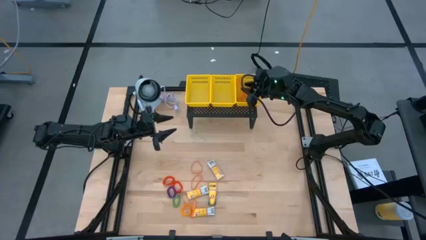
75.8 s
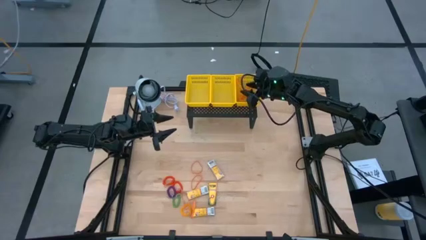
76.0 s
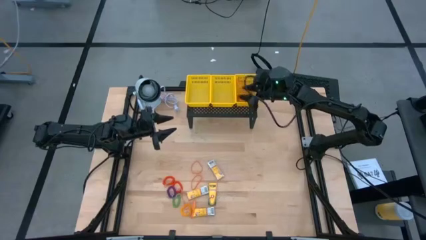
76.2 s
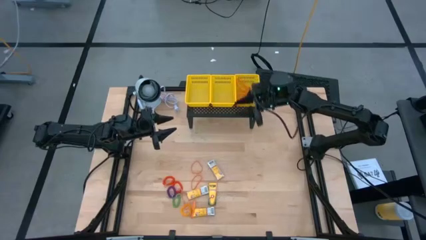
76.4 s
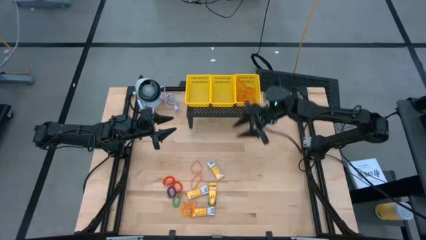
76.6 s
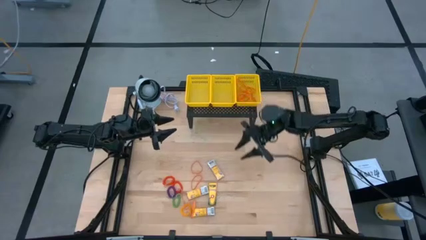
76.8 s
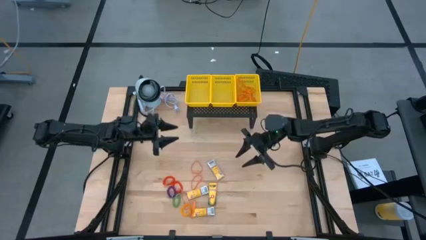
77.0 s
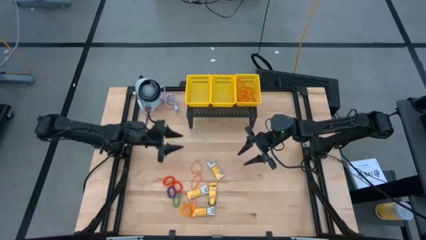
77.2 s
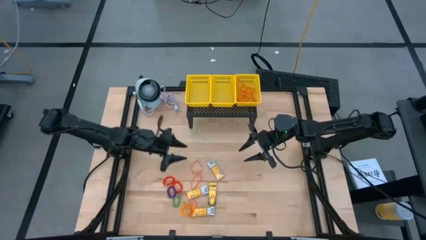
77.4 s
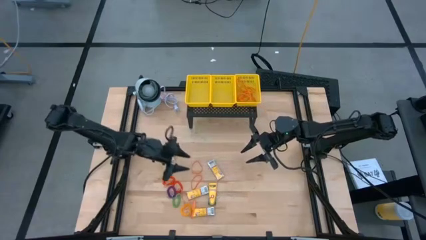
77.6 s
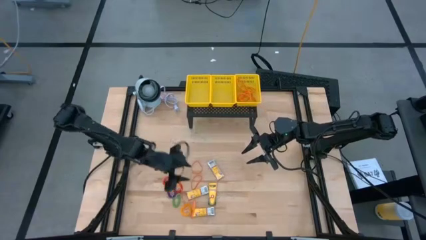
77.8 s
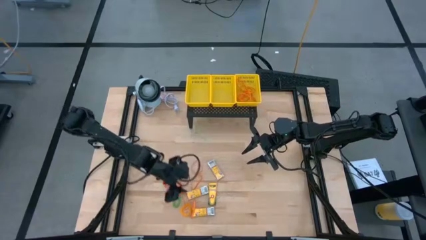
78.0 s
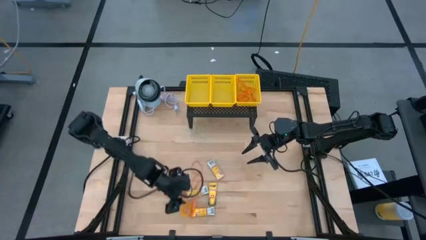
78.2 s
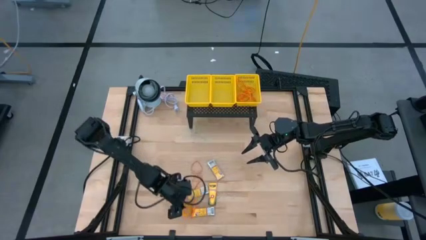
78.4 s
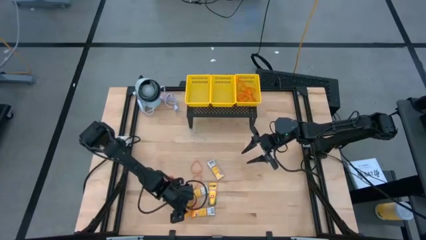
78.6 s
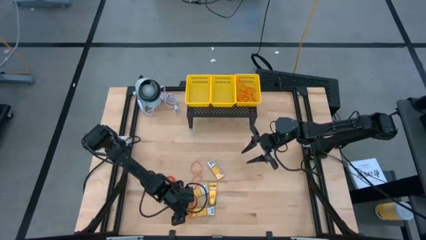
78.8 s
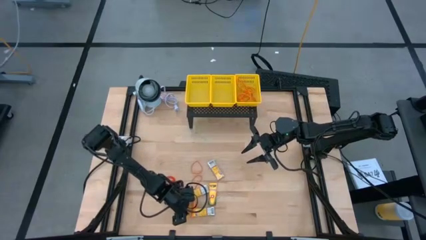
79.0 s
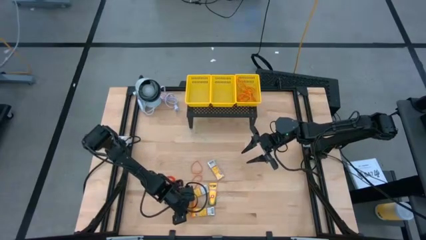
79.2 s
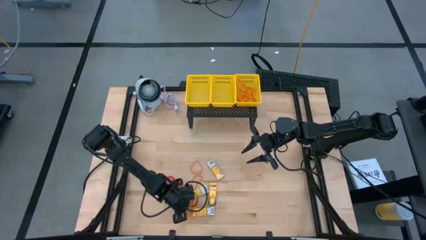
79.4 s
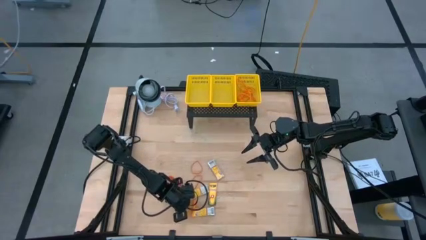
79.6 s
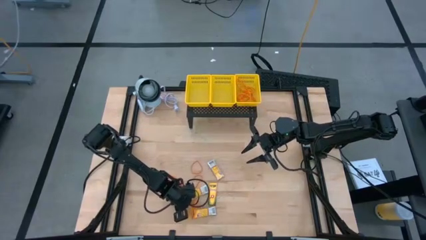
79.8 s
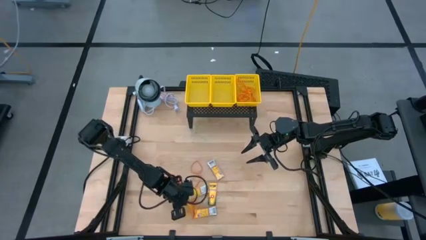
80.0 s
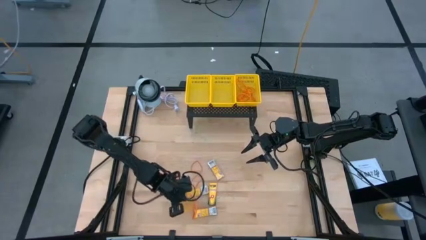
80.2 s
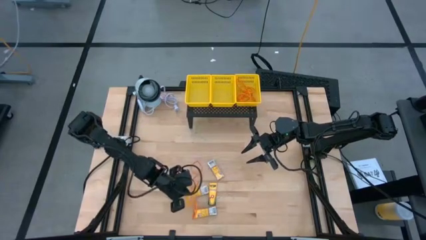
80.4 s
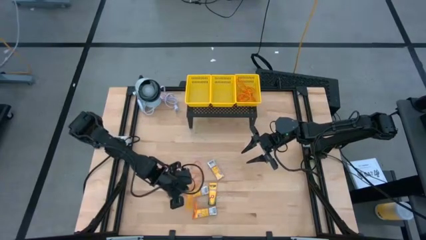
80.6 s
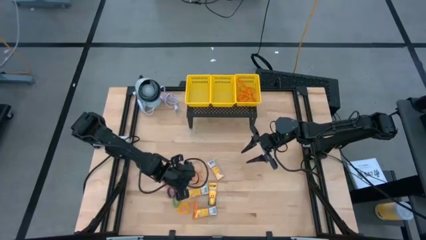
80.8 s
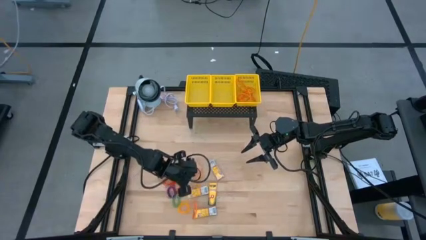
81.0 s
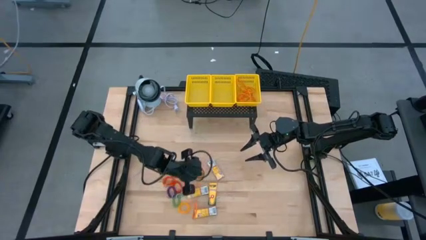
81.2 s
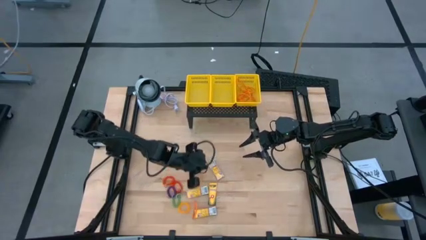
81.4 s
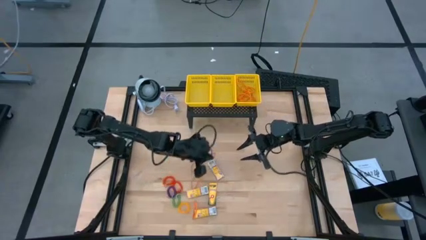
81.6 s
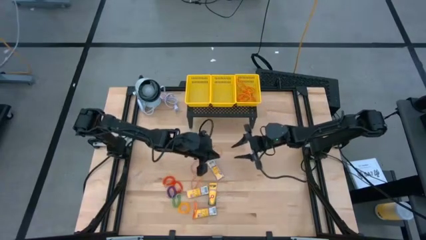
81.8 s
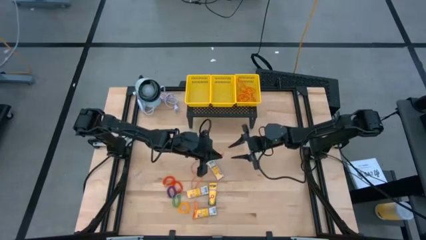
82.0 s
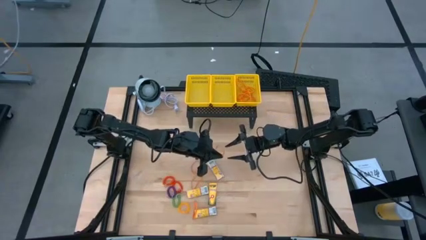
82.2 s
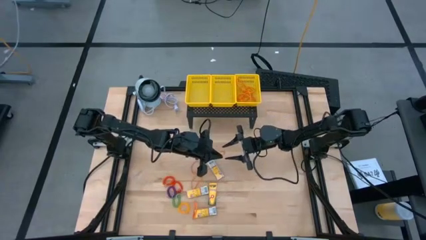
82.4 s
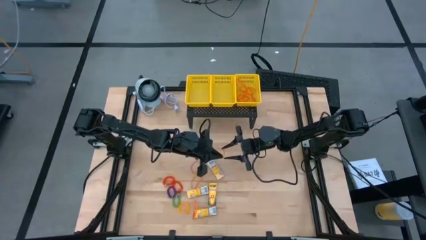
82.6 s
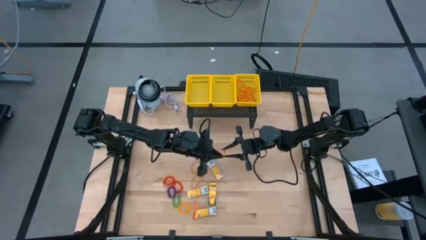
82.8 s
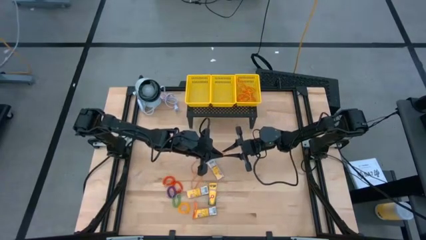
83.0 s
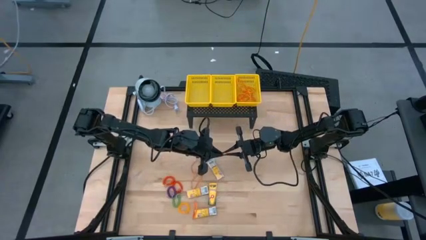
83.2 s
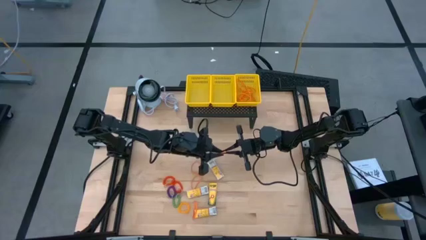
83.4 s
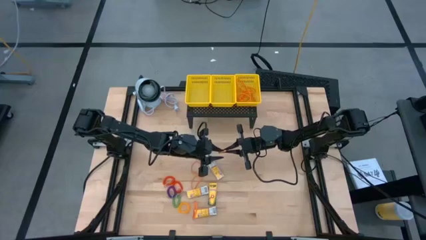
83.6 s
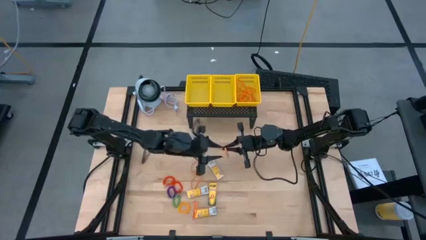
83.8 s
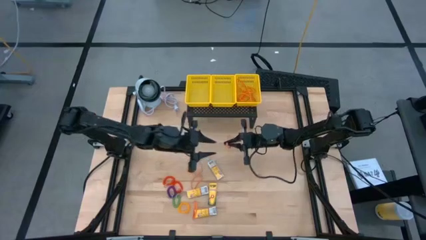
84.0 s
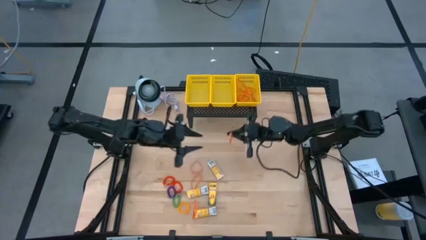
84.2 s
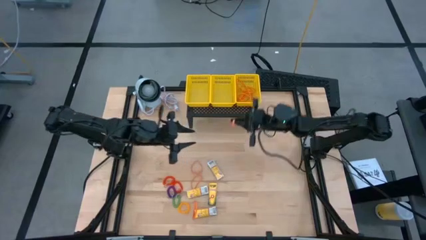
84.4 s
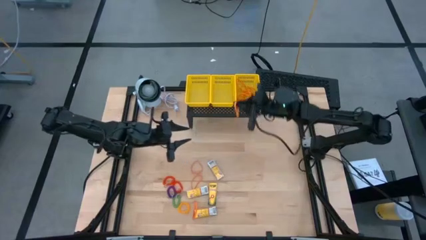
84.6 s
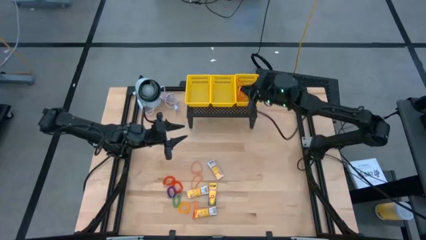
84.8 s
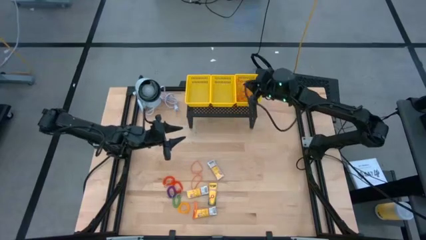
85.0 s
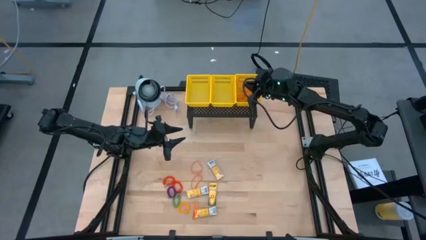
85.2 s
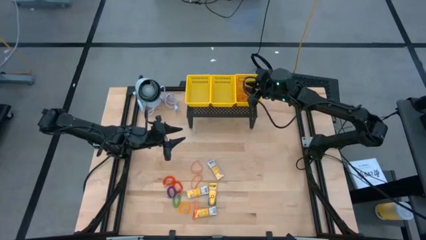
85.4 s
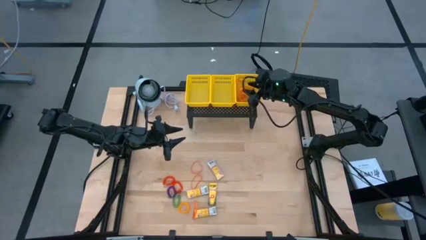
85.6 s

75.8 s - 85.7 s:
Task: Pick & Place Office Desk Supplies
Put the orange rubber band into the right yellow bin on the shelf

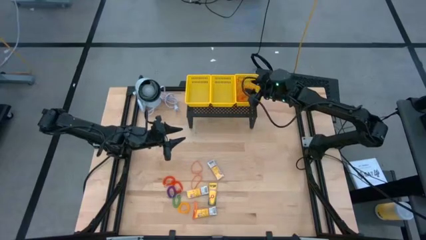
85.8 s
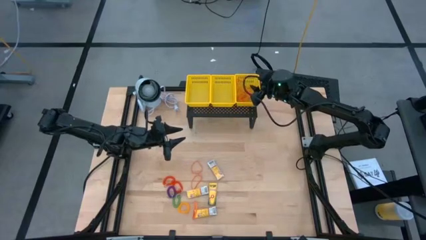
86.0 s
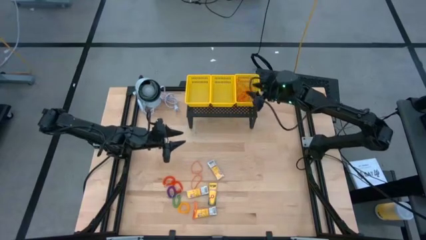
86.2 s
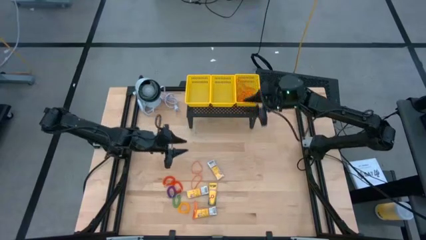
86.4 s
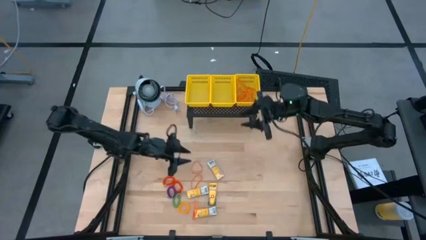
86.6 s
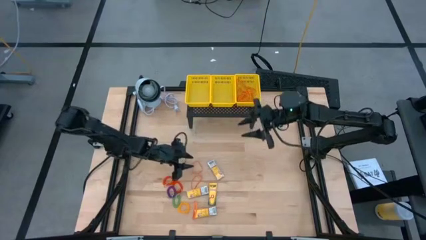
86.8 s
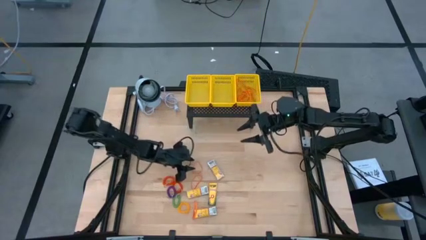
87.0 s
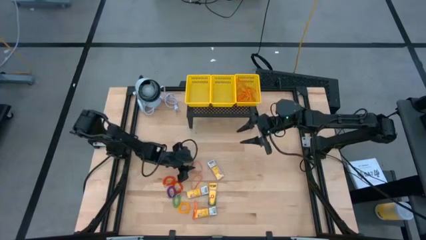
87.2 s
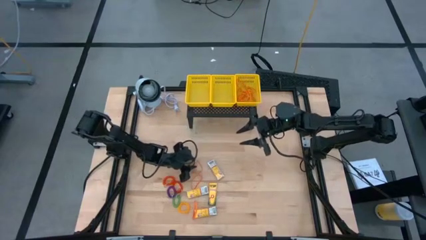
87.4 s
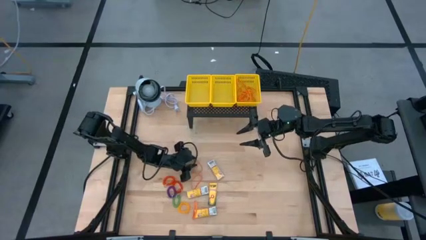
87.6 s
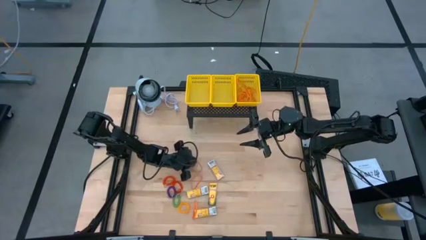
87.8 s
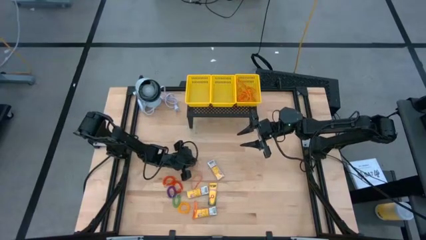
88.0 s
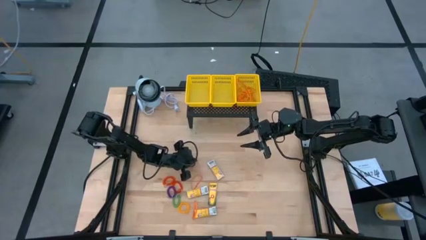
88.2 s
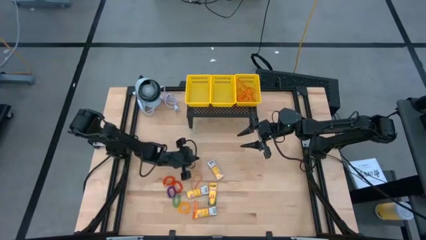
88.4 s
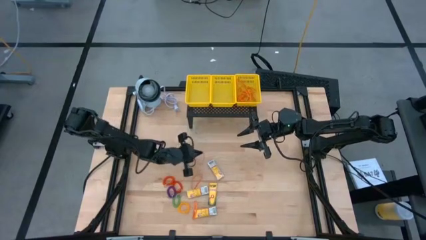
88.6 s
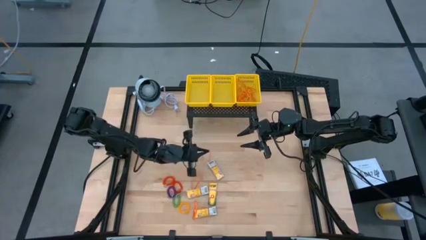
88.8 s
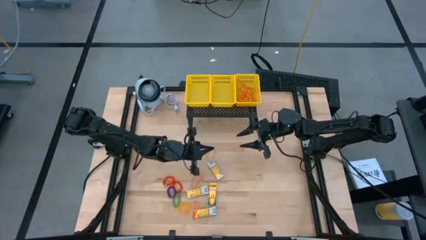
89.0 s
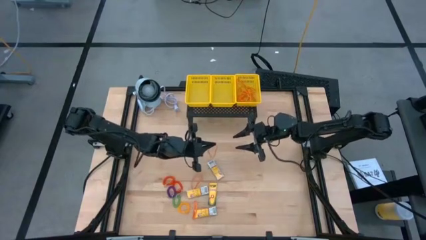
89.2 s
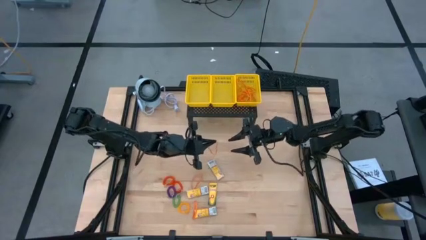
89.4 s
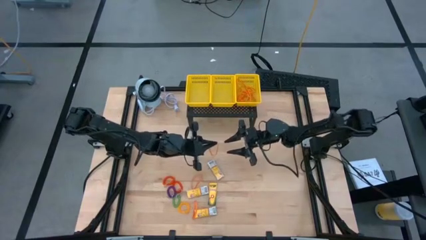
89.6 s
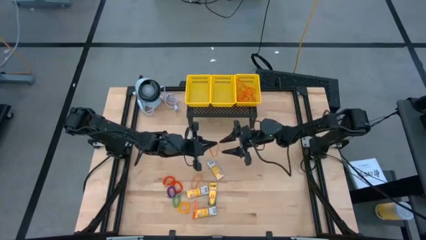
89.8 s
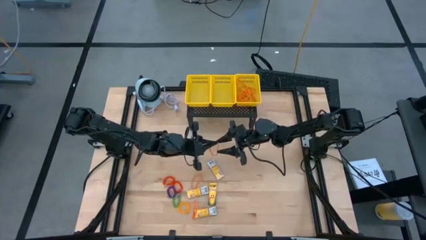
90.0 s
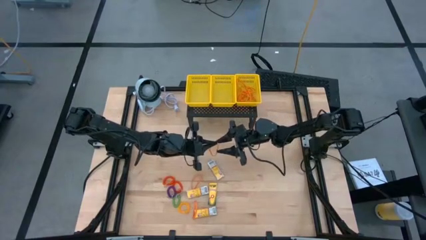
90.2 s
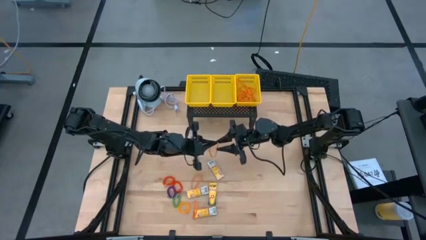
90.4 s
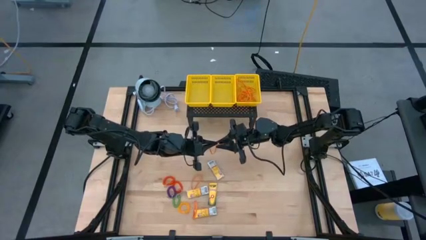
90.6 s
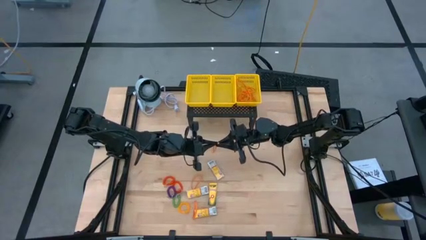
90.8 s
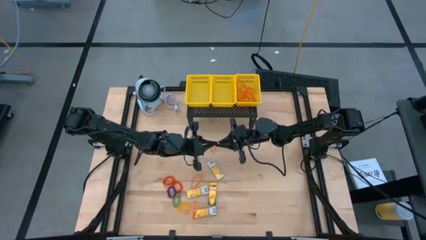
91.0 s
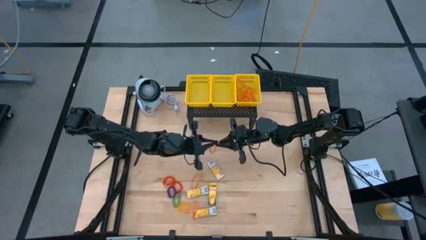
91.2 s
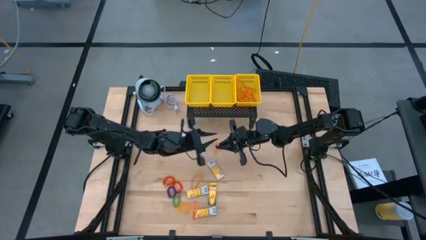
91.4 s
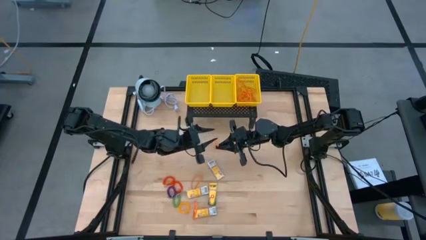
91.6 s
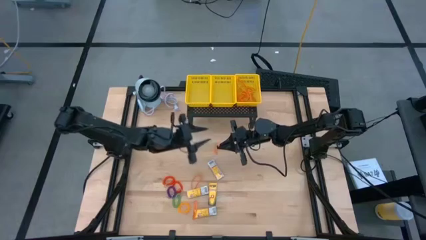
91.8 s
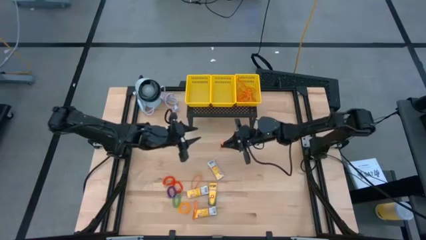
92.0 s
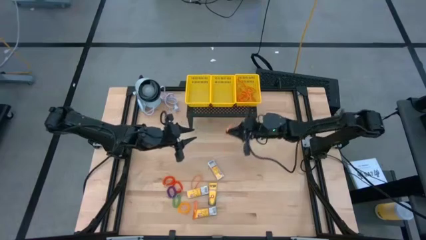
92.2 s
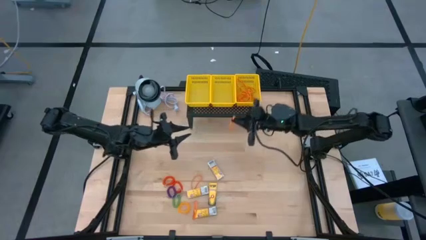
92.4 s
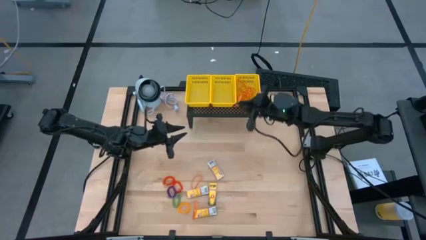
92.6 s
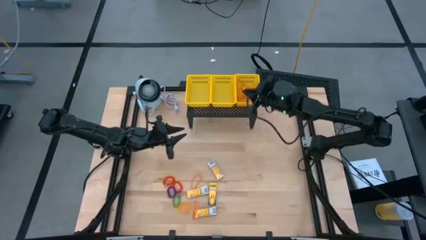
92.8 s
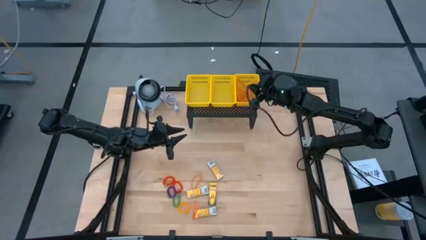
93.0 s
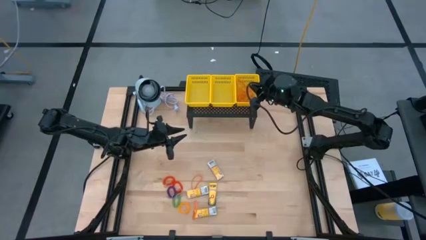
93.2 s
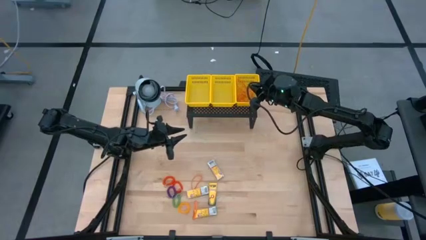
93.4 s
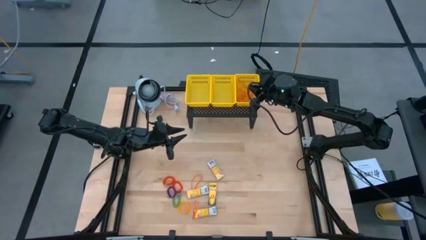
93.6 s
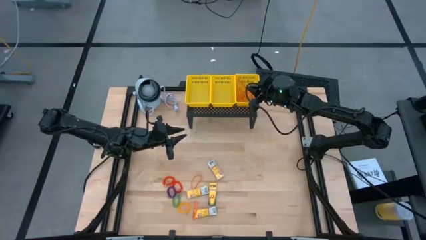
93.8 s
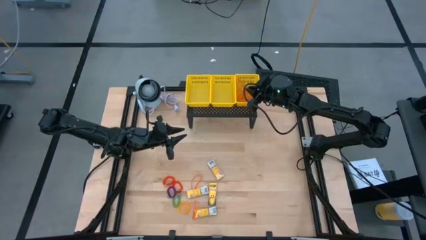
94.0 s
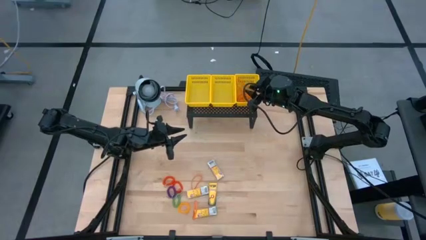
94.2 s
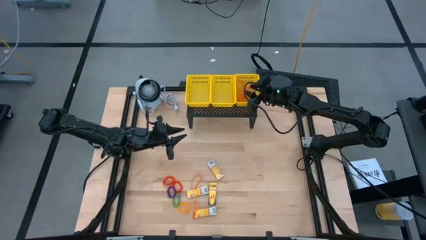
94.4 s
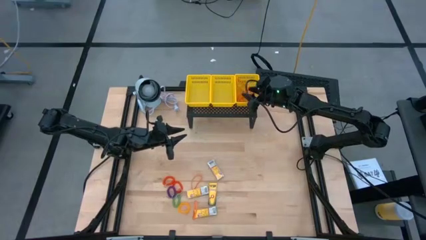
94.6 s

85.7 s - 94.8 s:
Put the orange rubber band into the right yellow bin on the shelf
